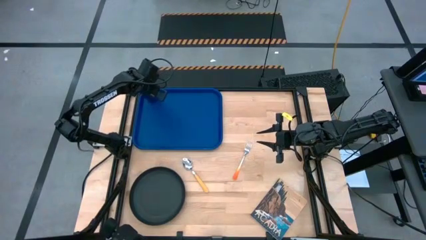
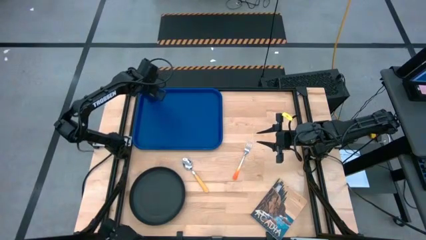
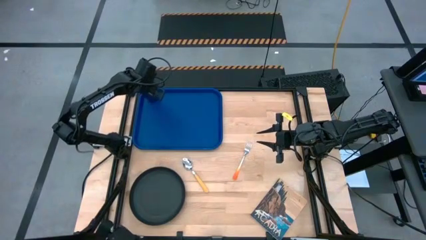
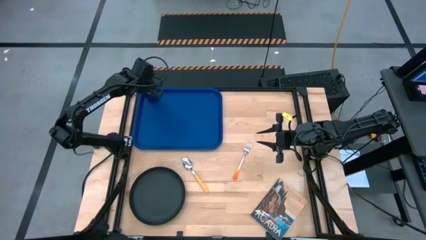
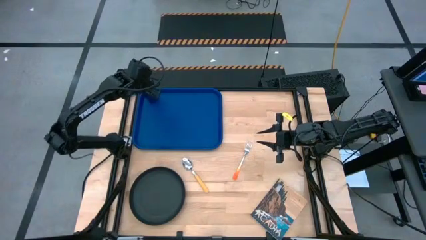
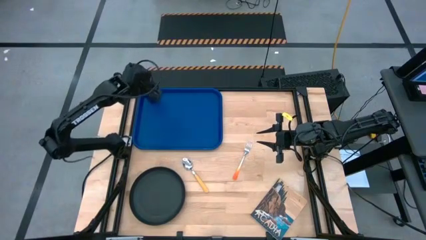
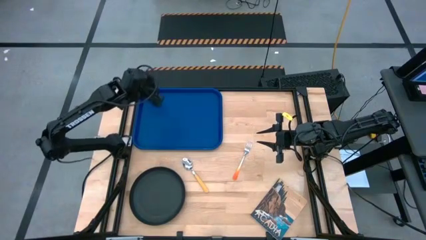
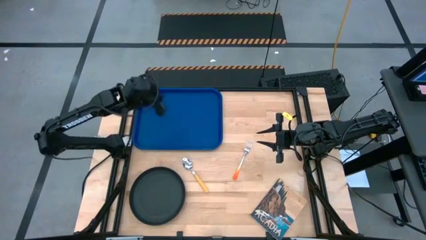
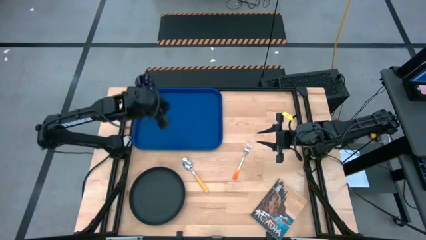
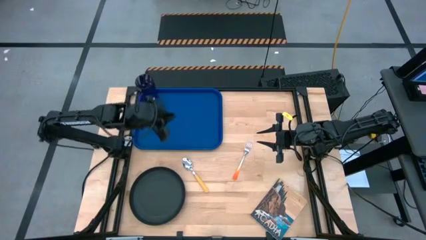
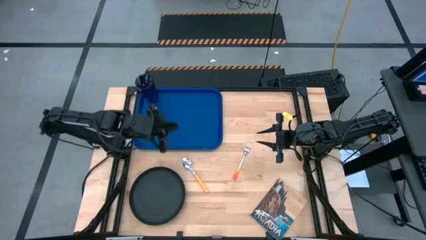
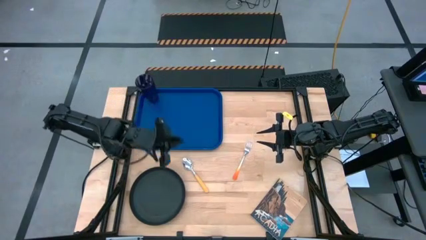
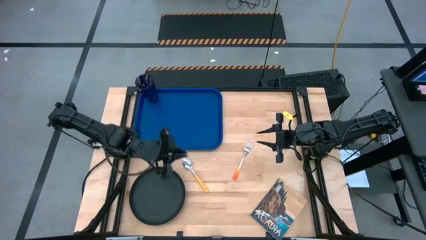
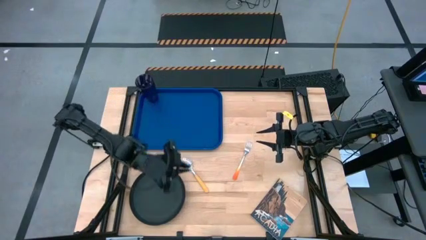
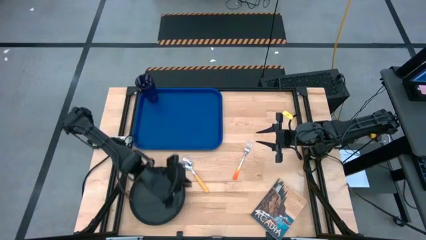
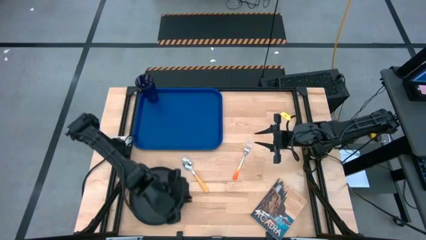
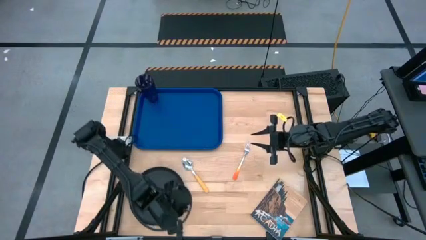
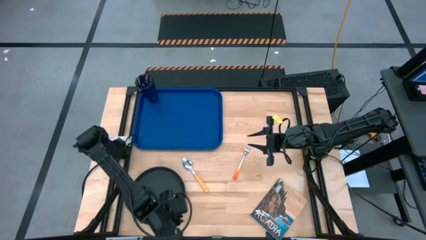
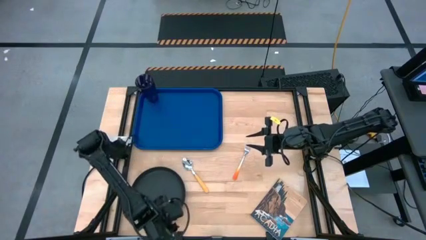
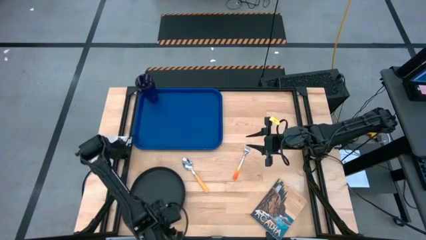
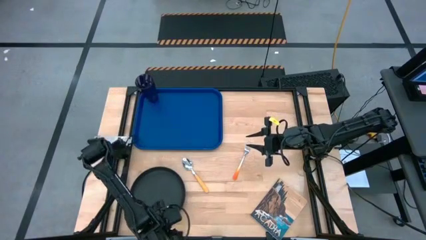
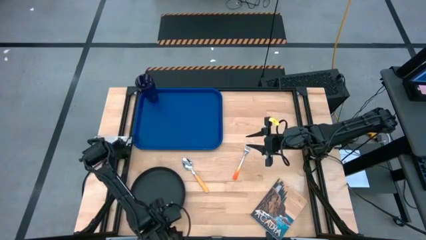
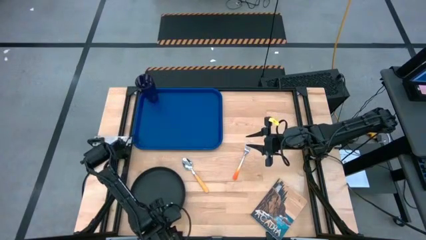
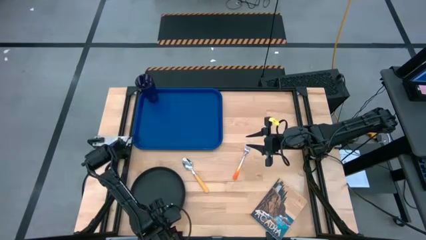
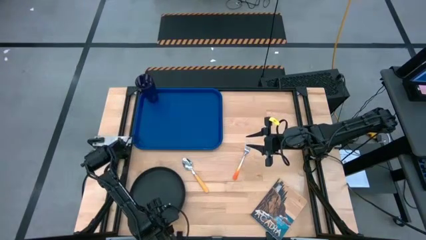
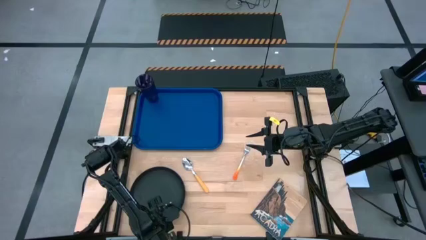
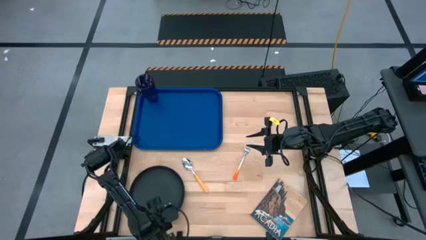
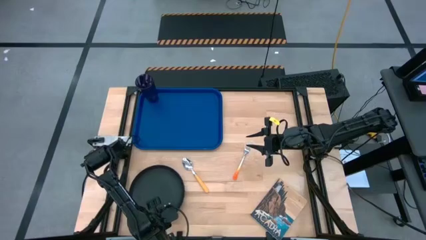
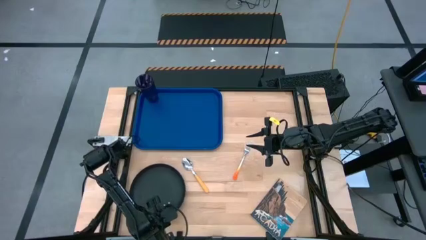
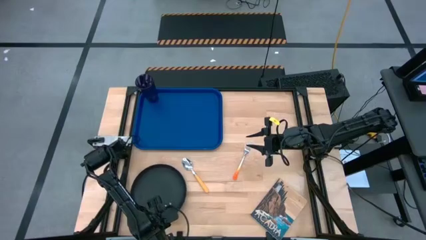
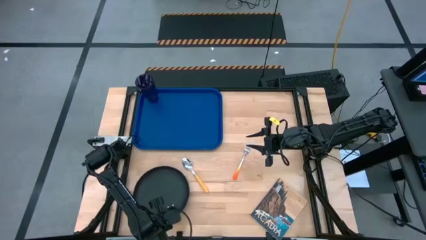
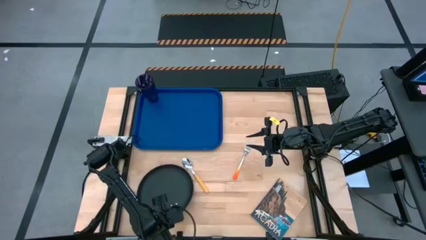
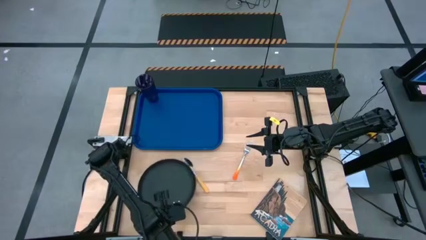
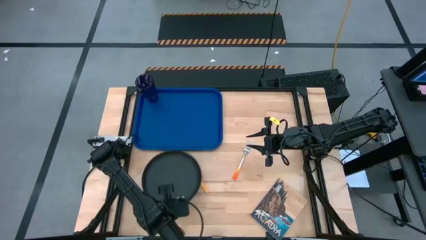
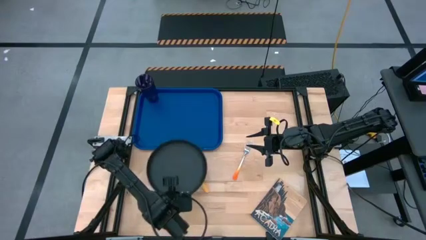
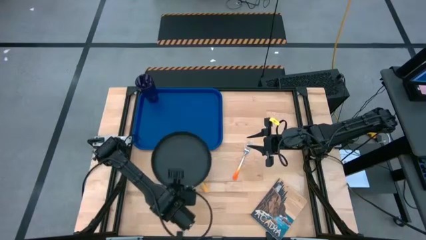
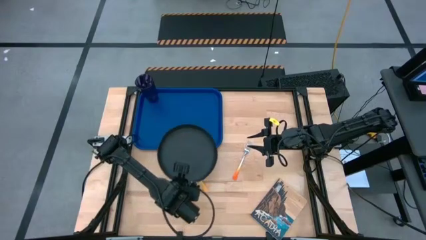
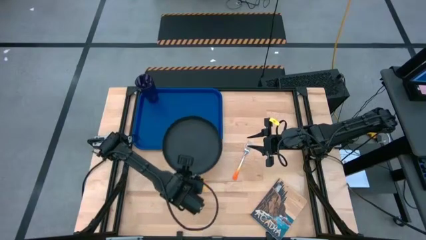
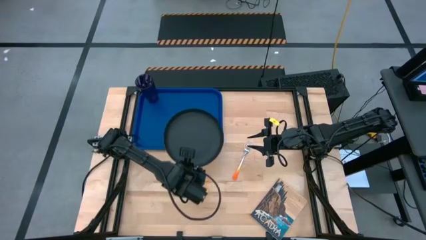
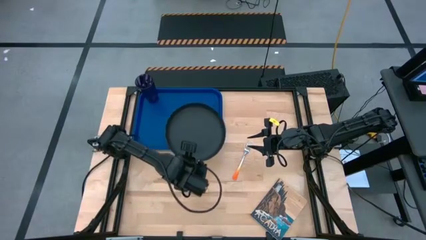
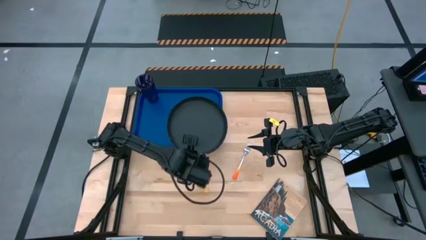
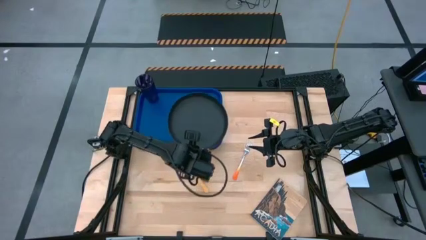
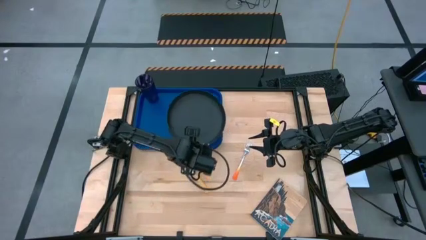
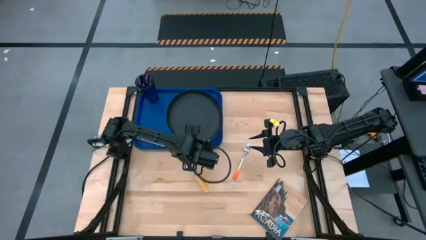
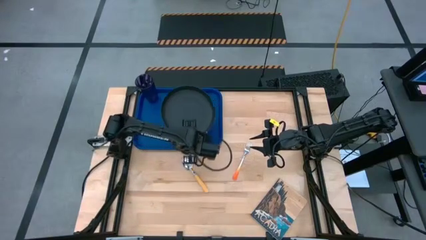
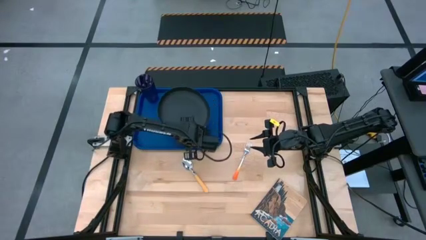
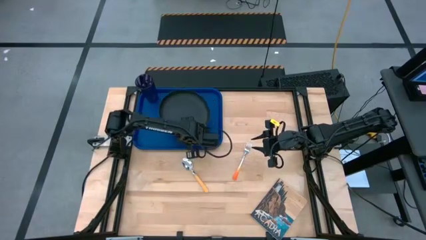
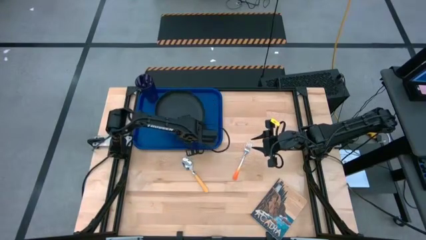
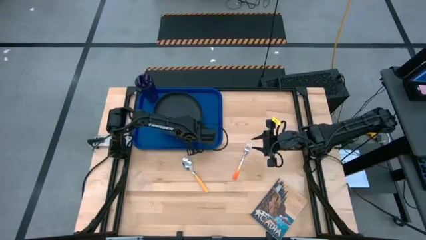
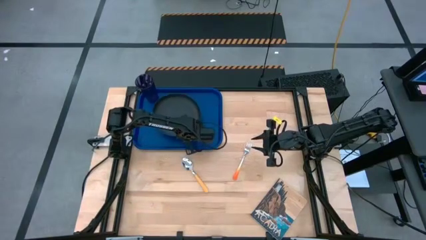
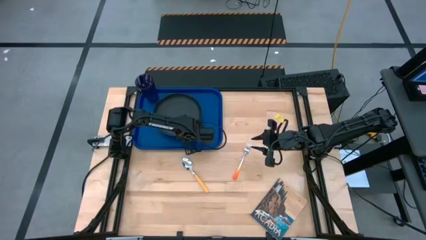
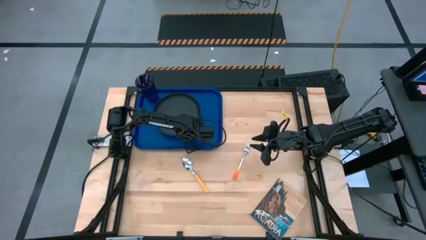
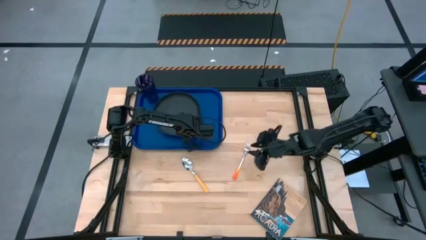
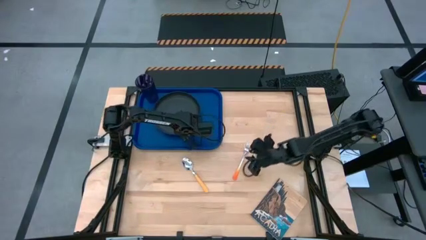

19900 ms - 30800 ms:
Task: Pick and place plate/cup/fork/spoon on tray
Put the black plate on the blue tray
